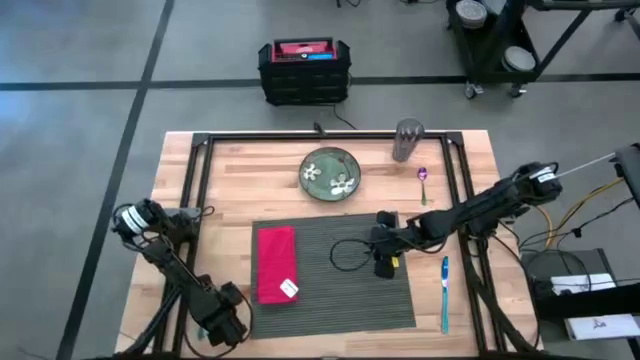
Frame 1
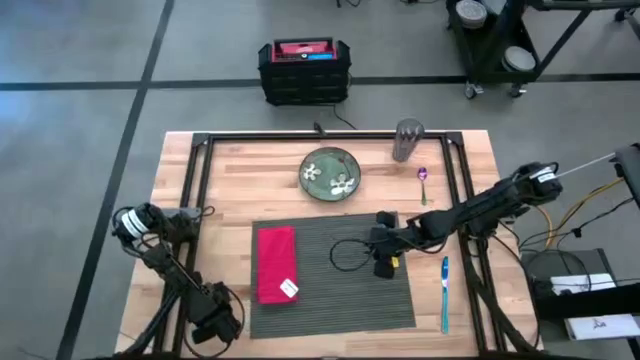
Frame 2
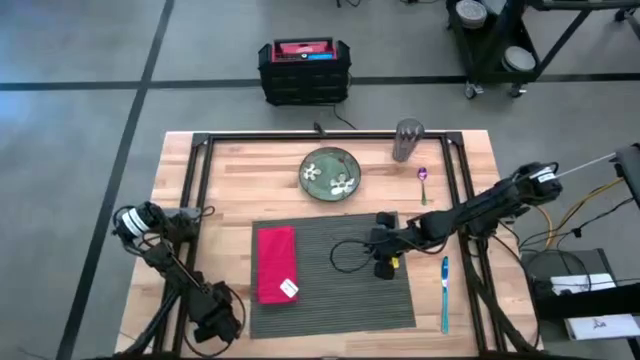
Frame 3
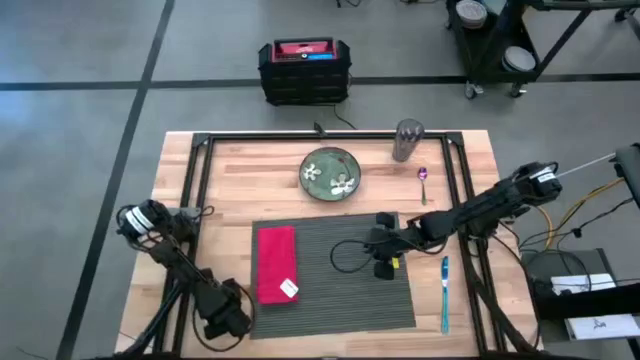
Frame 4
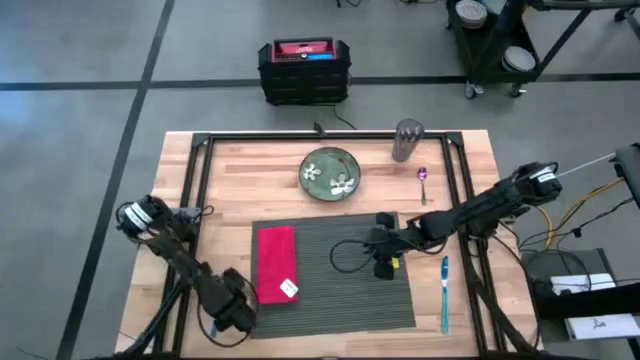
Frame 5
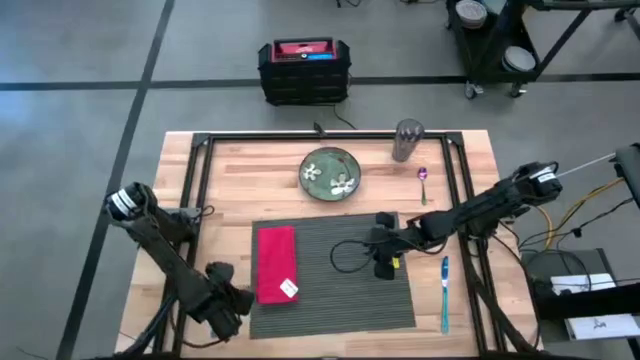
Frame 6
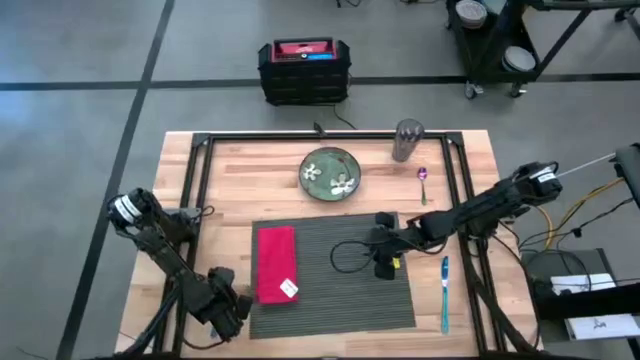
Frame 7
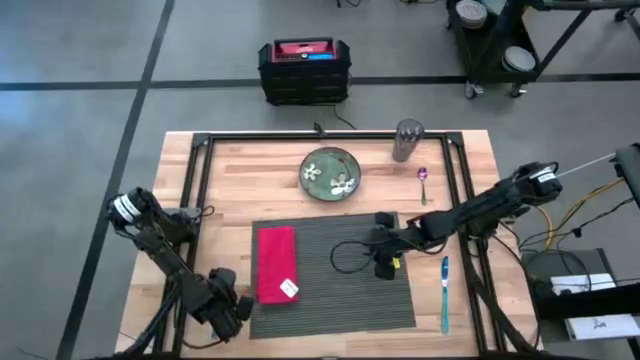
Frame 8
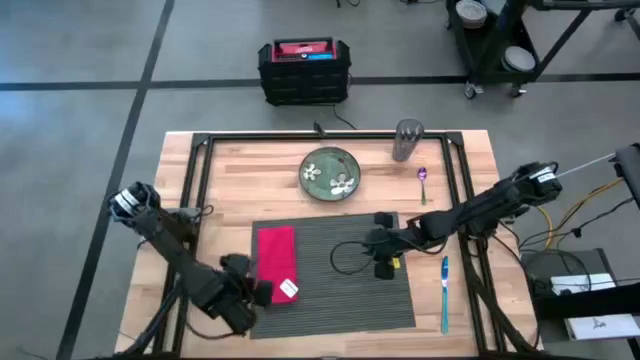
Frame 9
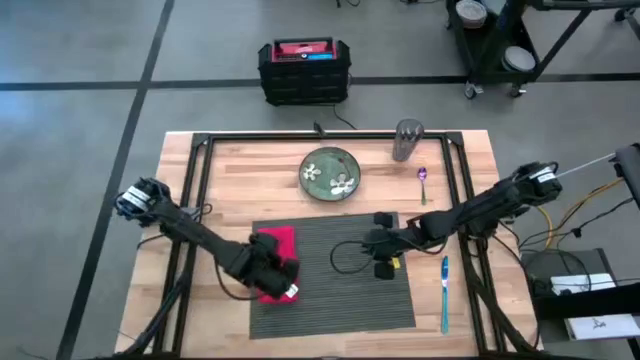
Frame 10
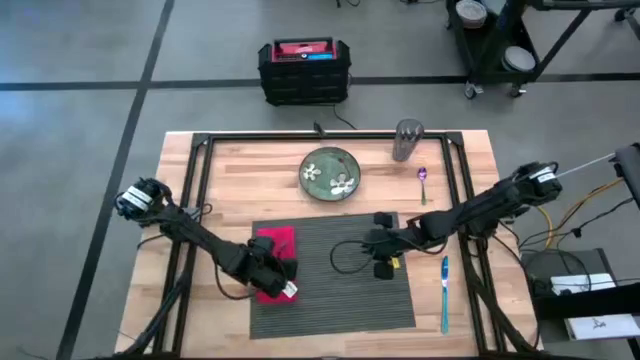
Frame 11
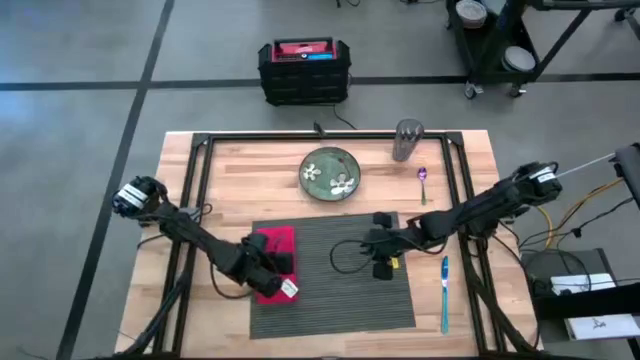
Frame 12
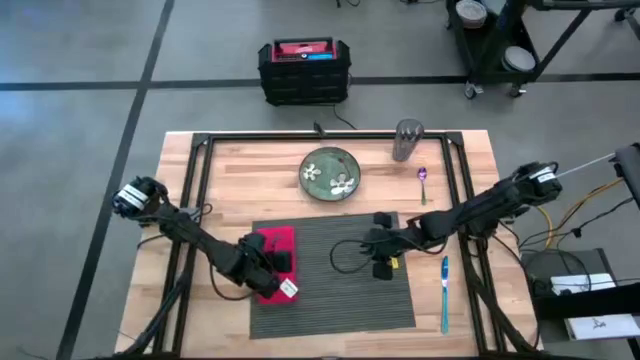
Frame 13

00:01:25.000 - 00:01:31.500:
Task: Set table place
Put the blue fork on the red table napkin

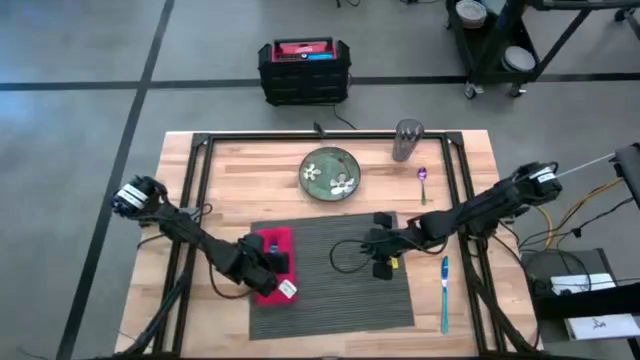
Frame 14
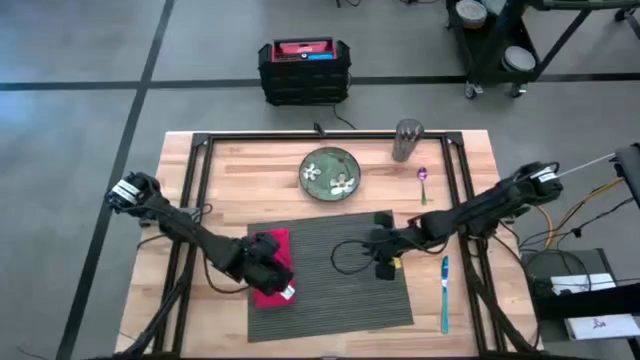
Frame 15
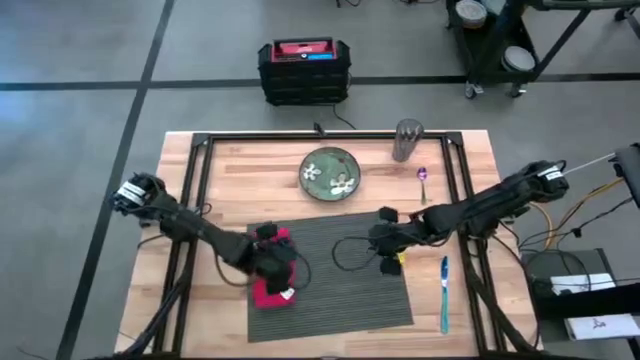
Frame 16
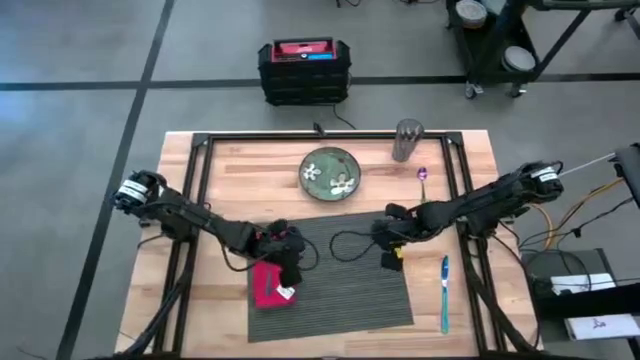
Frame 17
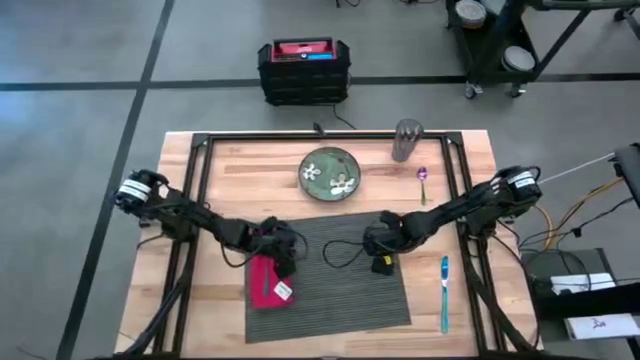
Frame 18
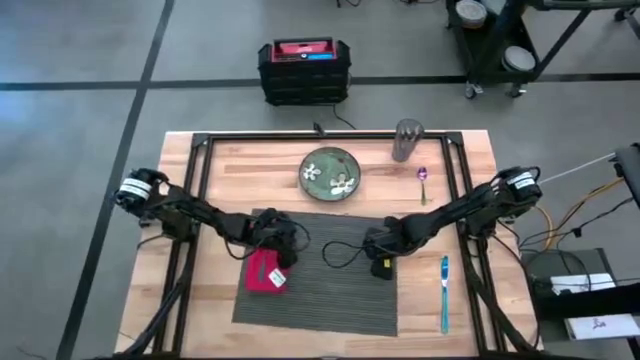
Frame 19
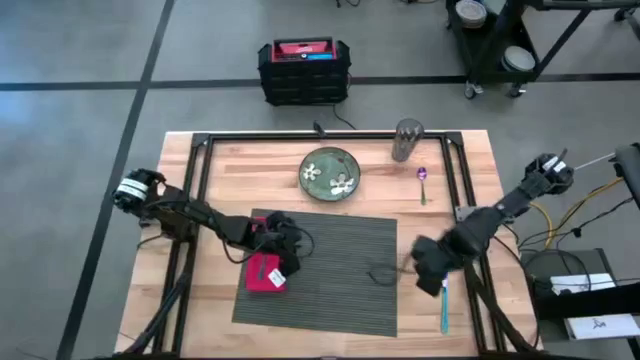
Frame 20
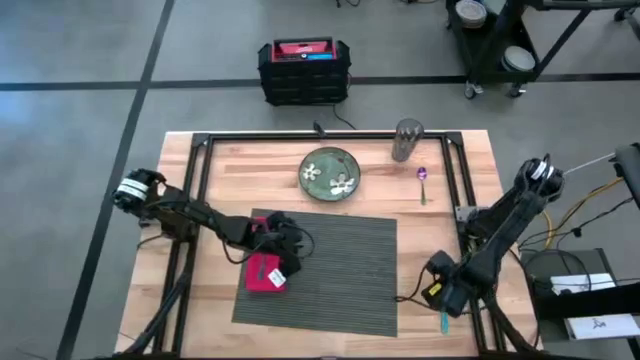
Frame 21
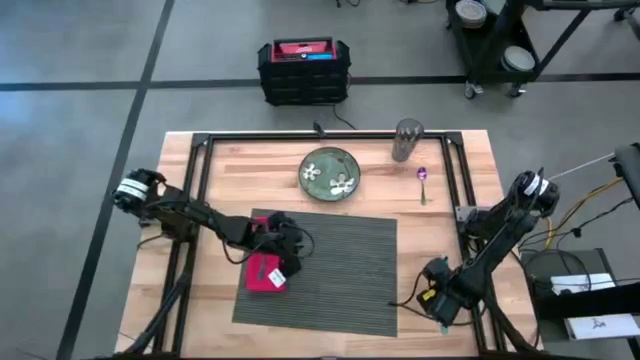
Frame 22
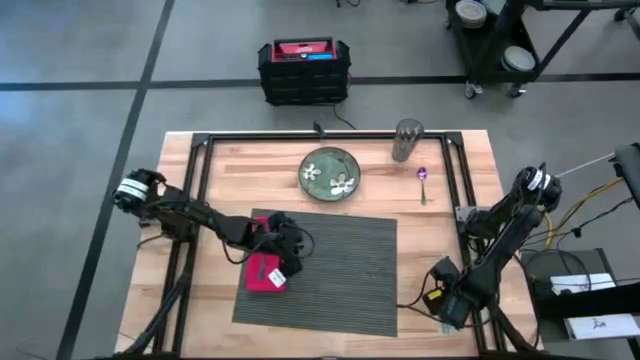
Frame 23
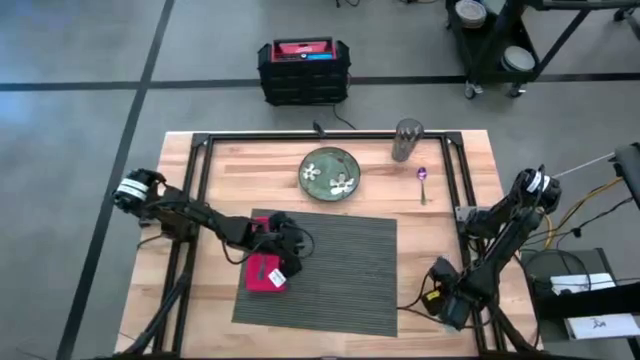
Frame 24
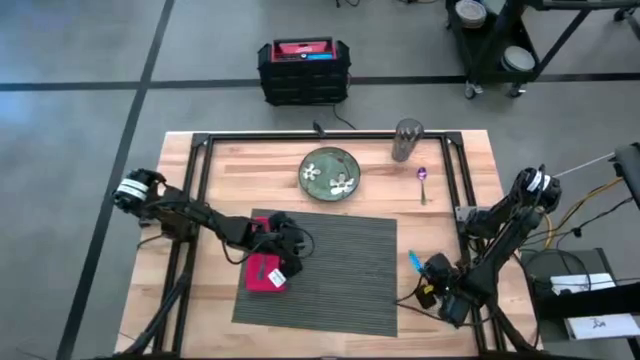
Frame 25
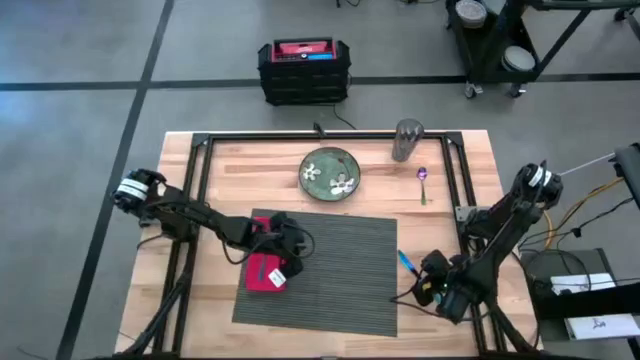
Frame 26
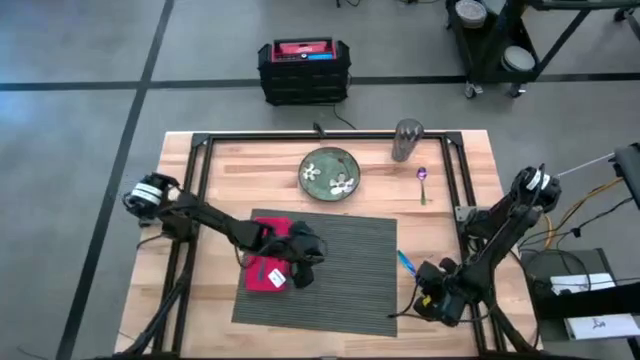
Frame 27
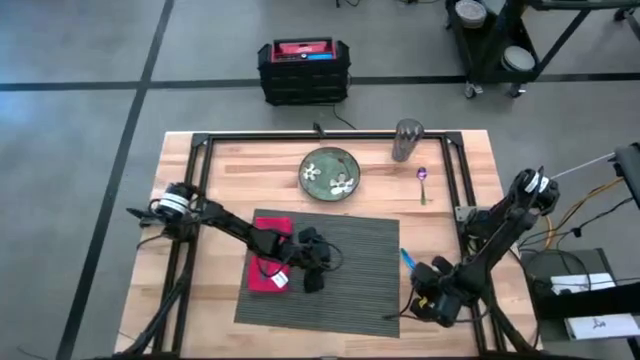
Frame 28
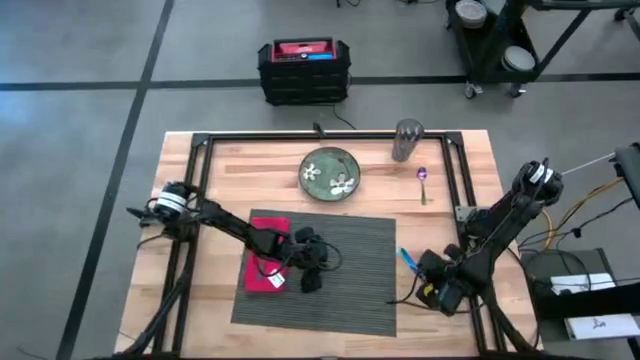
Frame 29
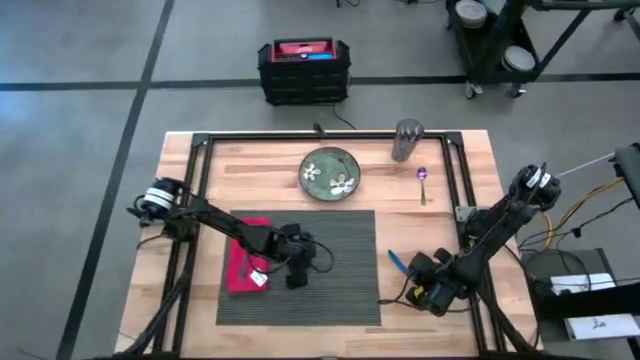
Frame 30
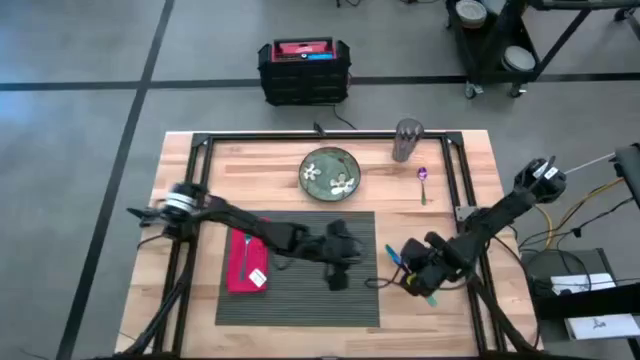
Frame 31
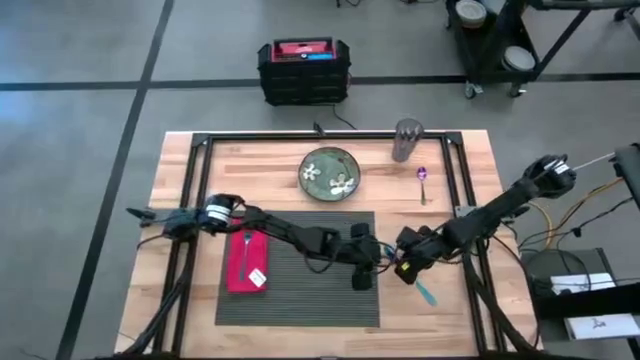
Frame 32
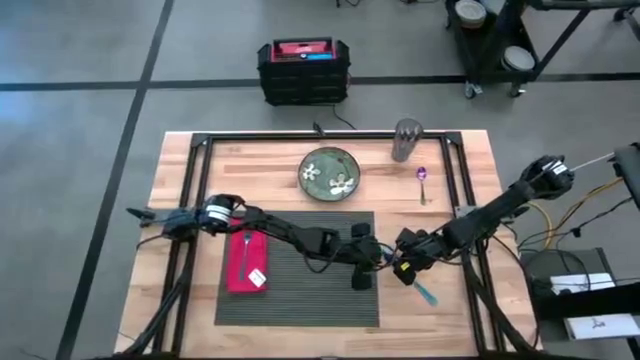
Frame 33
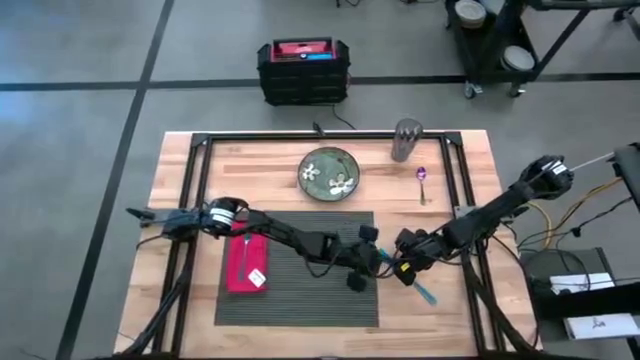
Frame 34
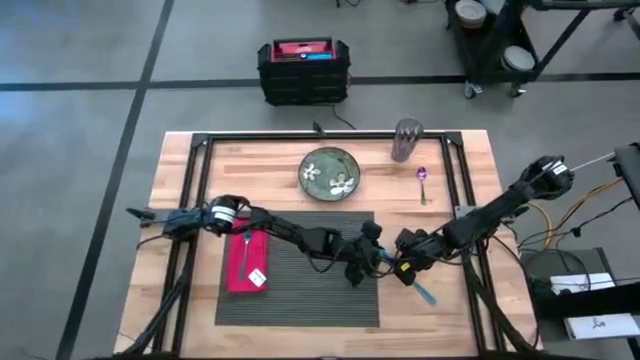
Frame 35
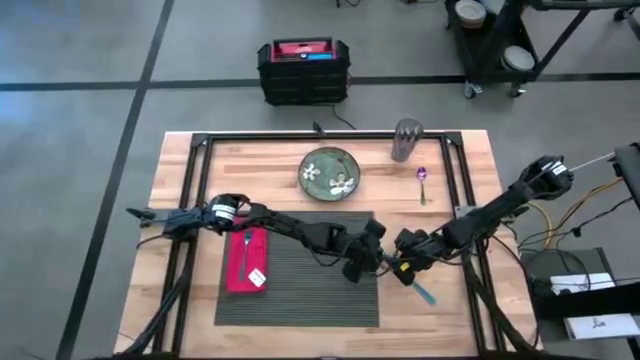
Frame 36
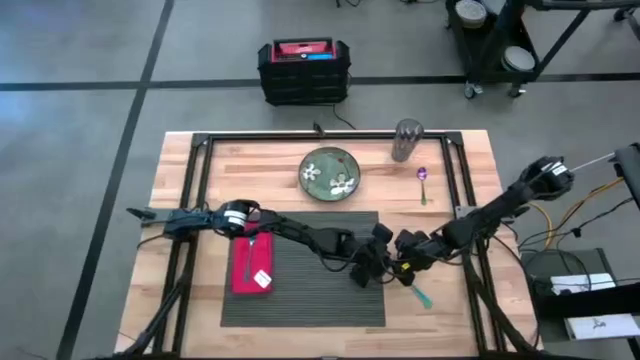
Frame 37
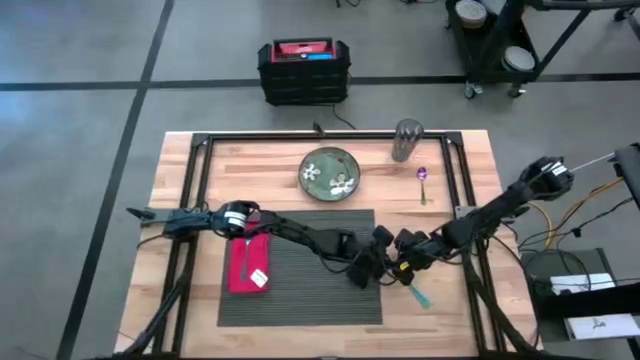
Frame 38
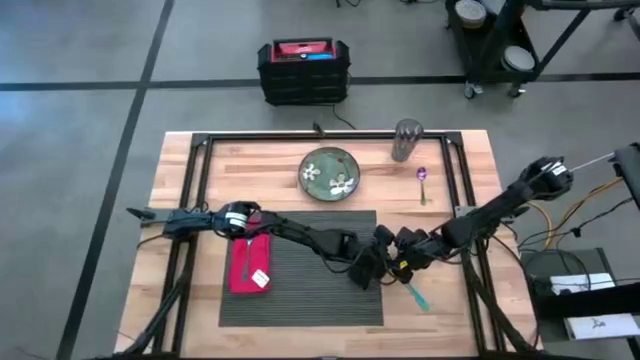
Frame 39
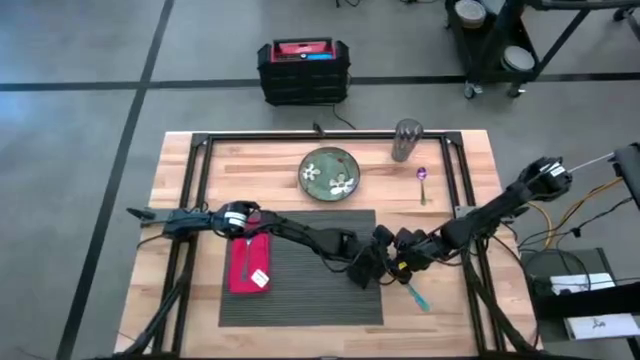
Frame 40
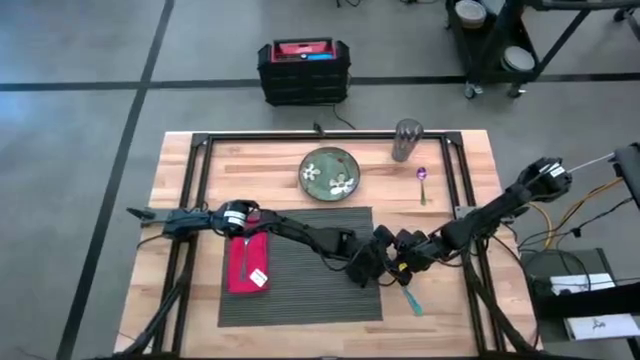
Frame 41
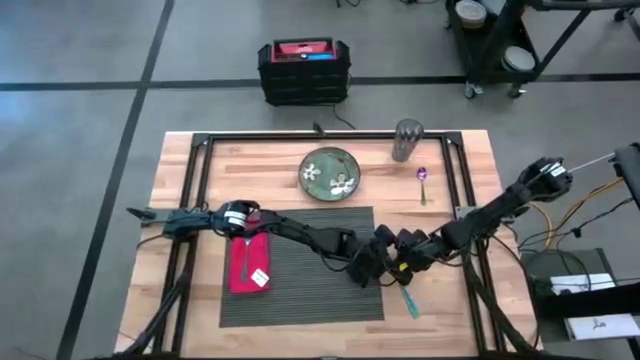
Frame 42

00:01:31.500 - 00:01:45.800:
Put the blue table knife on the gray tablemat
